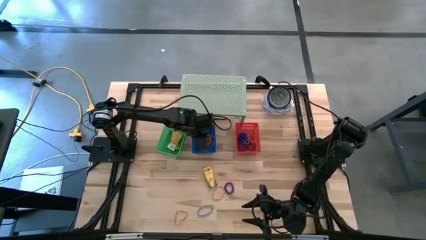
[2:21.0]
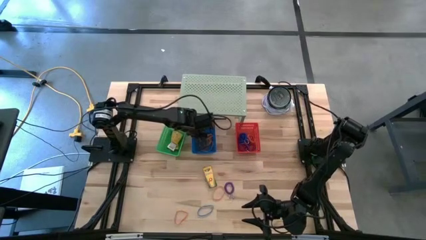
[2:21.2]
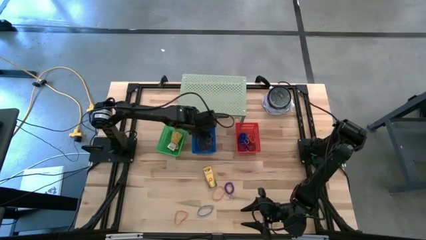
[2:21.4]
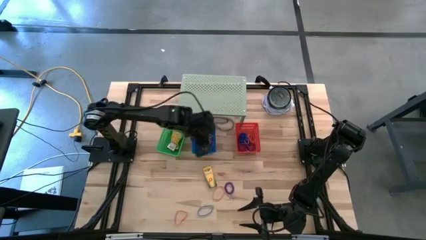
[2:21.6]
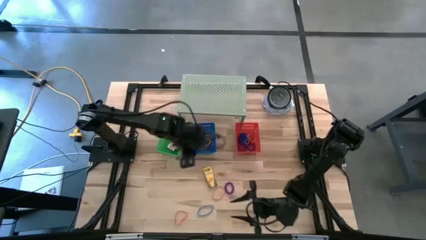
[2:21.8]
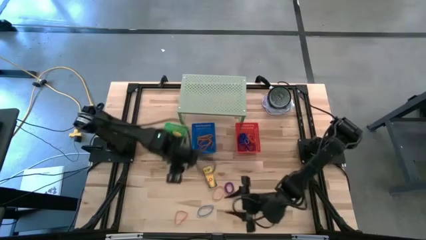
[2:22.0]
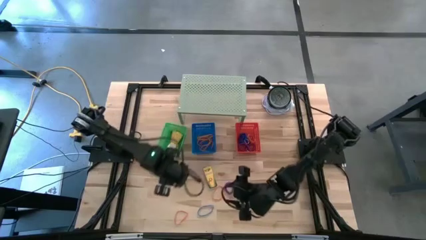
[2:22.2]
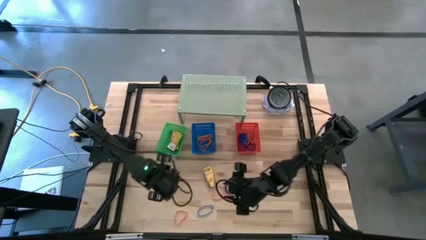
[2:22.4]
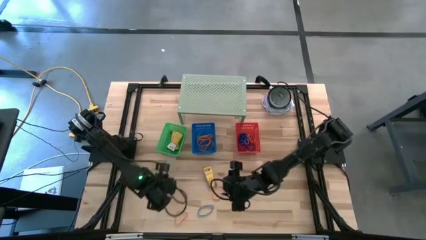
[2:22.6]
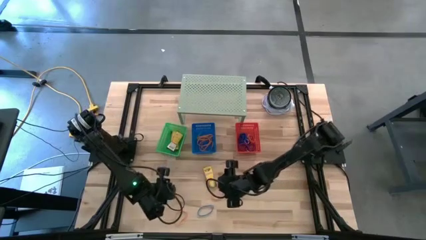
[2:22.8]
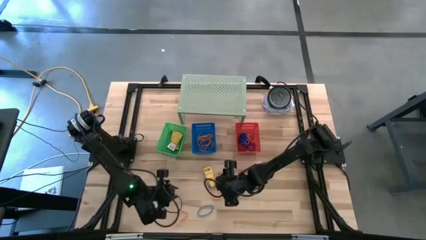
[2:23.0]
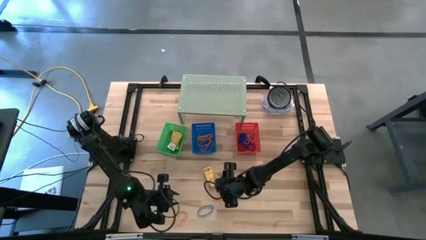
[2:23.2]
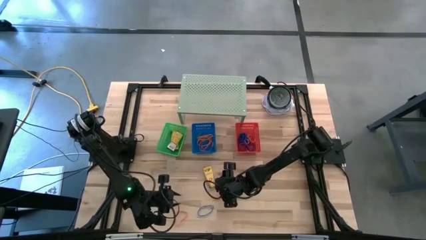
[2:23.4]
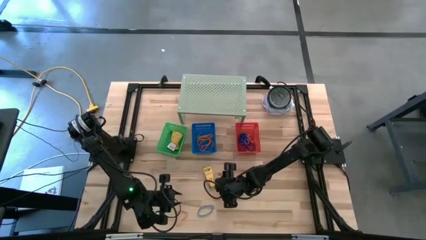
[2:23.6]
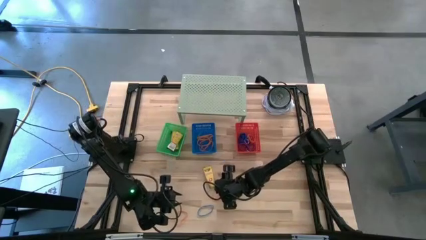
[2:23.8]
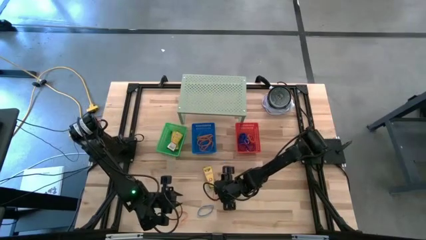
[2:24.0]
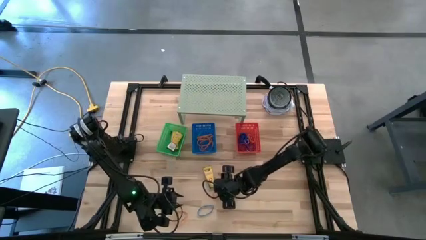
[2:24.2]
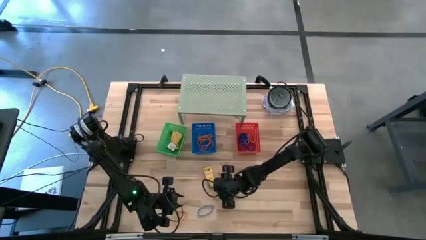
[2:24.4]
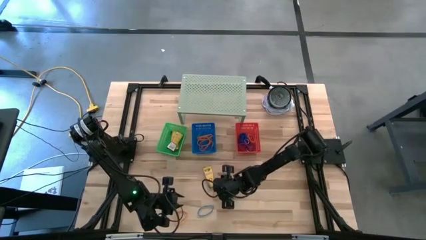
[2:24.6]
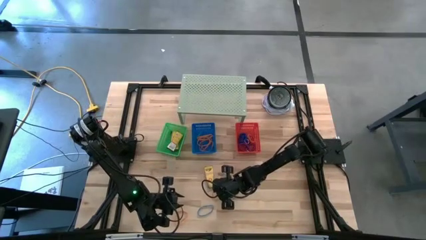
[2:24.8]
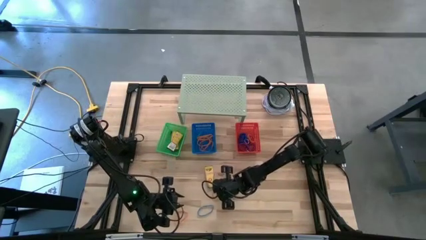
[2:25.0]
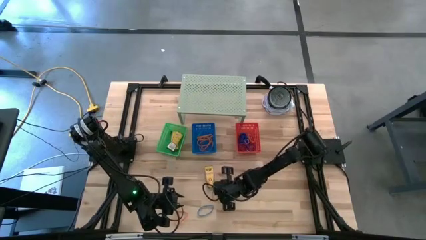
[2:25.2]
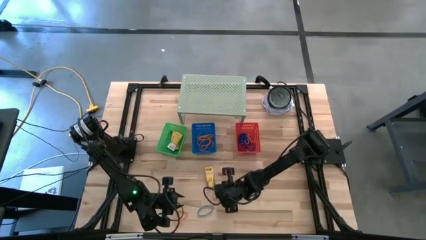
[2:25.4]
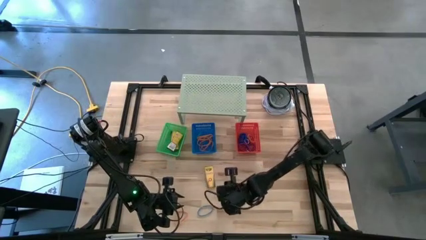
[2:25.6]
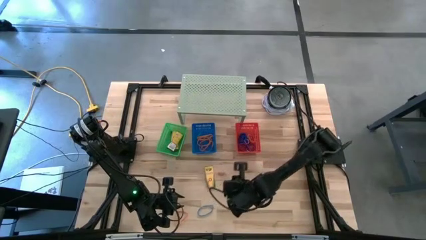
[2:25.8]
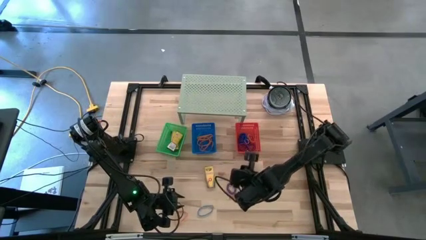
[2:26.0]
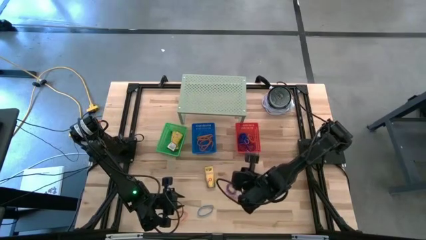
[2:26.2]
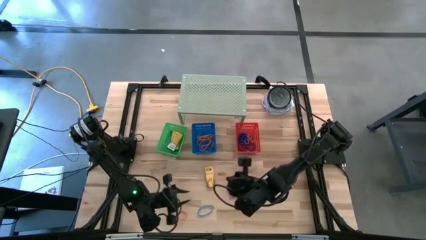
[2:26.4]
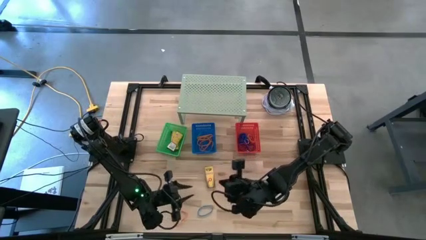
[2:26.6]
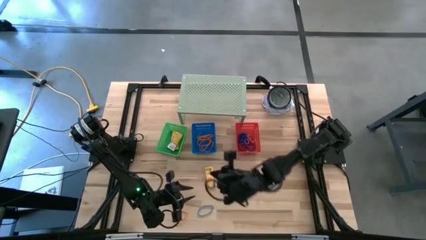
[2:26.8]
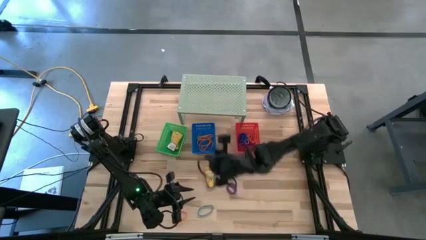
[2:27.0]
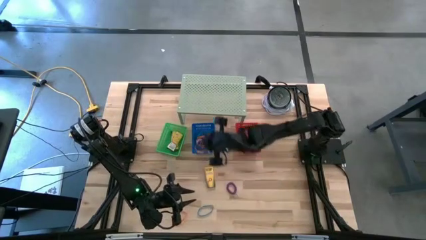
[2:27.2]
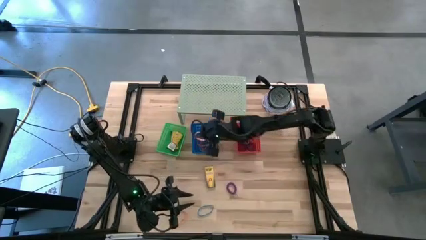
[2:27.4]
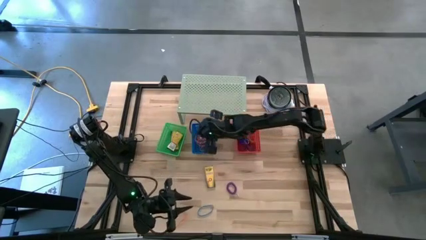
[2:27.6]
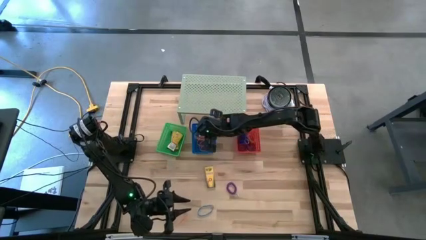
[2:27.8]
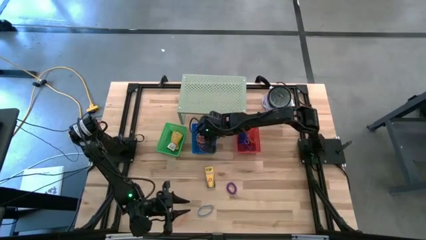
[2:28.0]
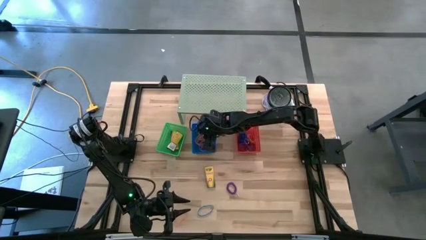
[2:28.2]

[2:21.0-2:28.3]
Task: Pick & Place Office Desk Supplies
Put the orange rubber band into the blue bin

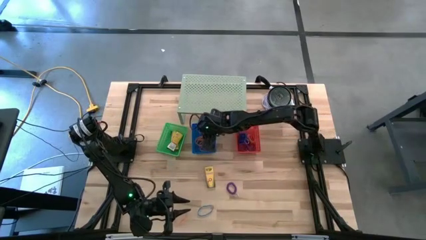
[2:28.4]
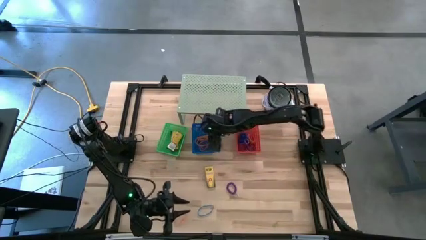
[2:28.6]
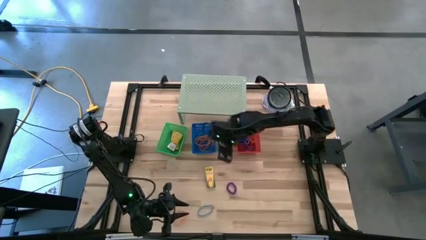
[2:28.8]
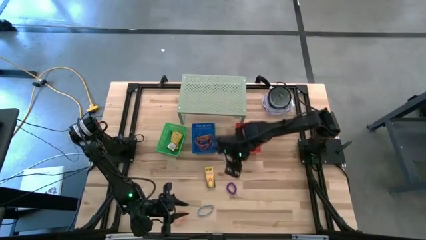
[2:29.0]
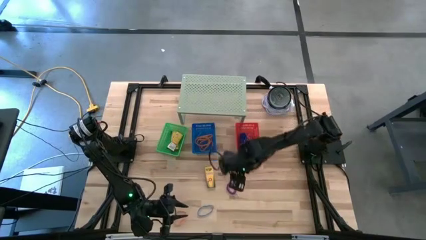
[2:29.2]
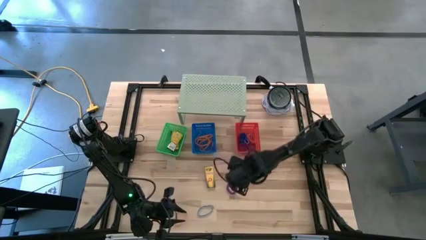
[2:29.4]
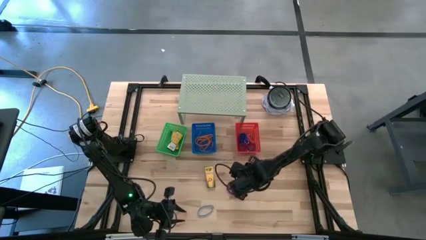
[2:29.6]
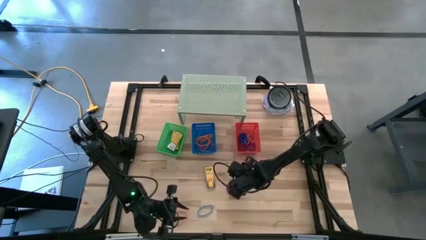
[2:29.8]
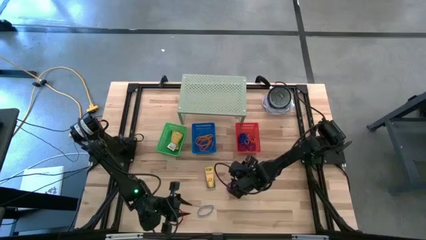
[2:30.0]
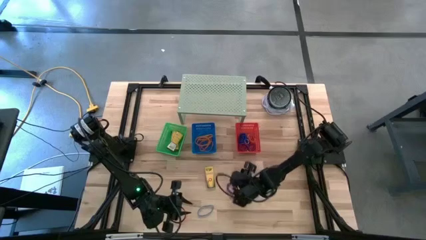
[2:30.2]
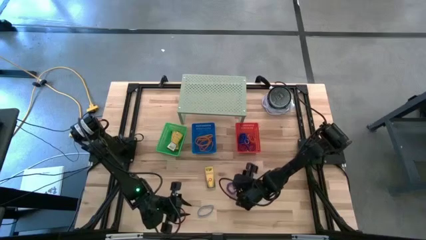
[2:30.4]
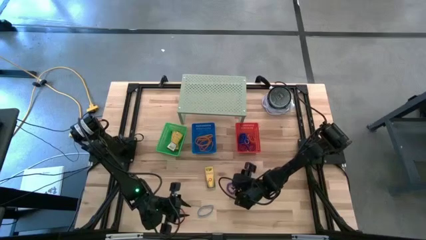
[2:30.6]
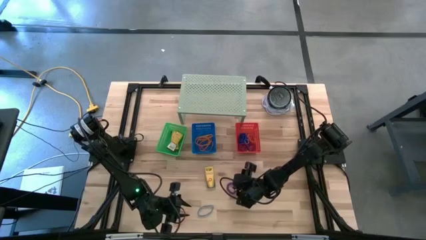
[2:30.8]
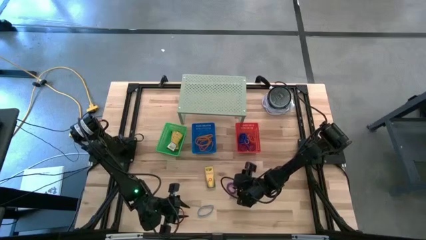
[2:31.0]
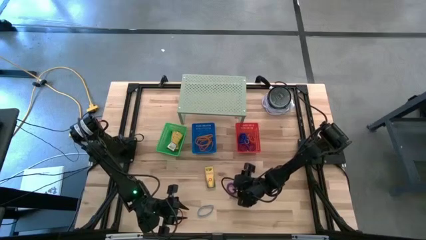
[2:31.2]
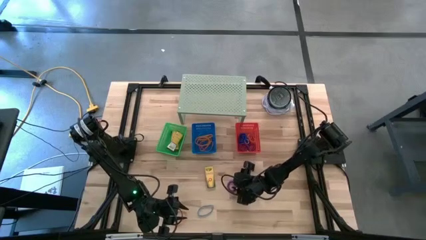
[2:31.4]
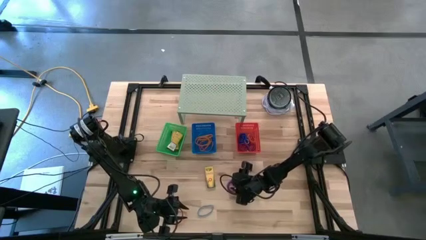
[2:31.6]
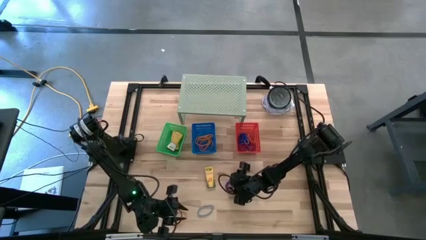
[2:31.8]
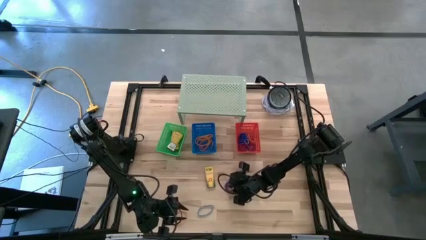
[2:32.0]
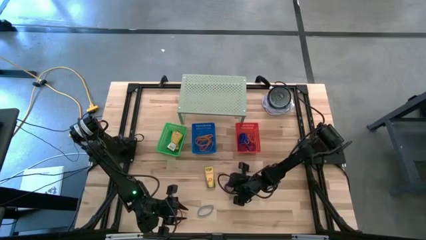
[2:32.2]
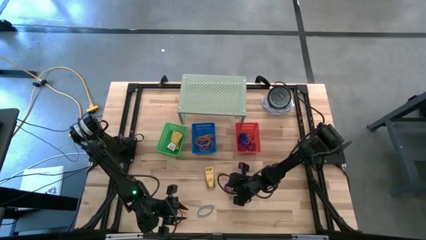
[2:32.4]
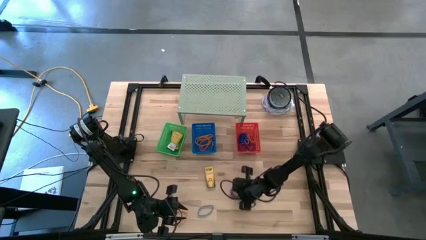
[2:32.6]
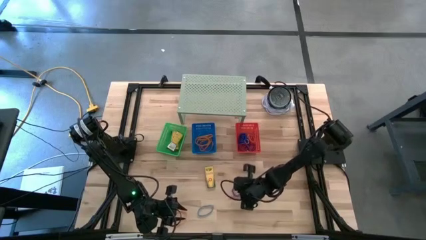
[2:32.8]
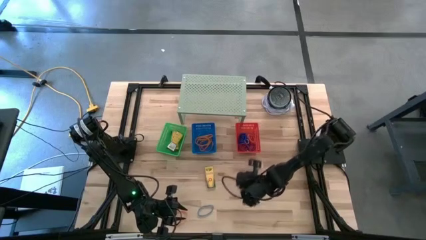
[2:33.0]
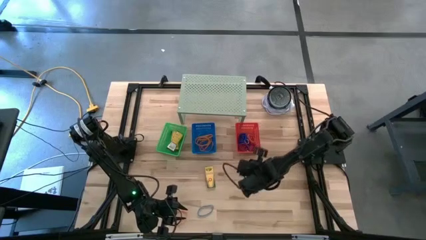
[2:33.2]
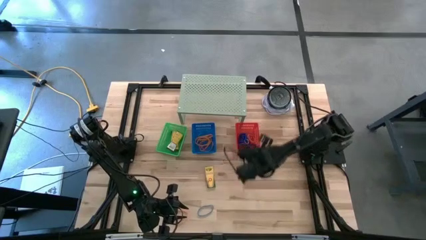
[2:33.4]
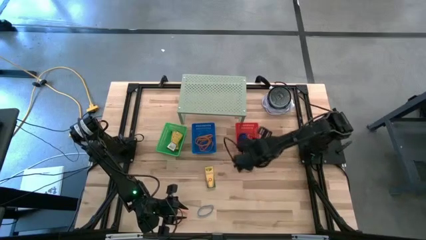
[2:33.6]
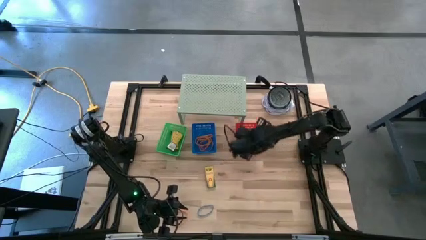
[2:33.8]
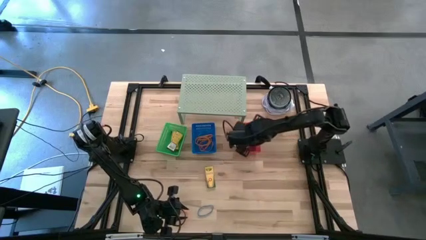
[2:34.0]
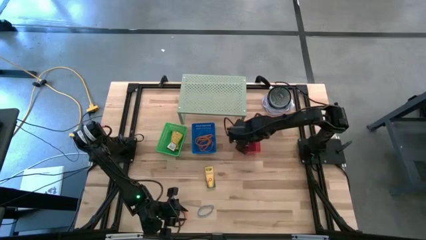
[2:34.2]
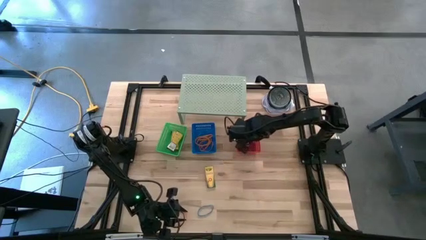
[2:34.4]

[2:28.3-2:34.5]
Put the purple spring keychain into the red bin

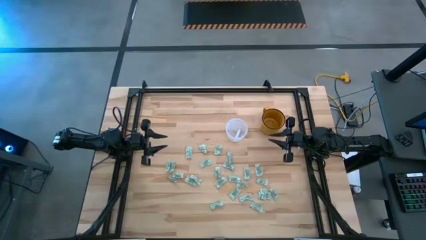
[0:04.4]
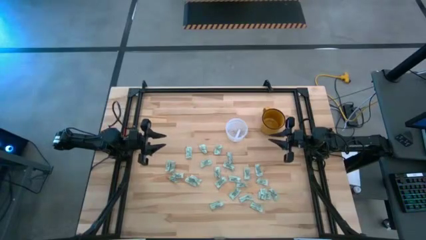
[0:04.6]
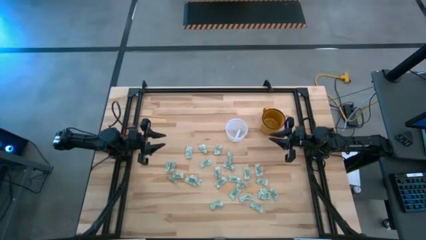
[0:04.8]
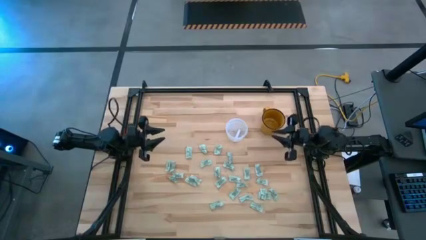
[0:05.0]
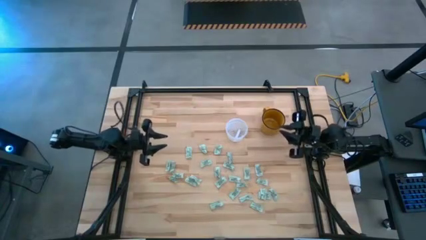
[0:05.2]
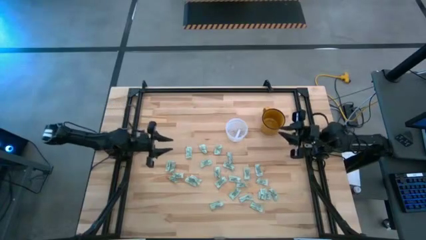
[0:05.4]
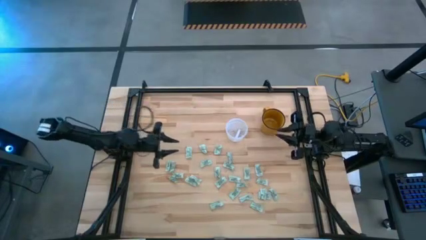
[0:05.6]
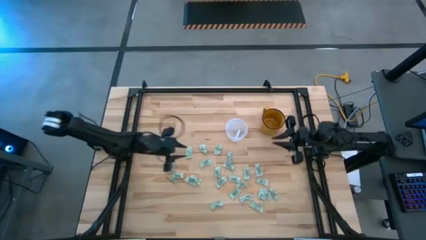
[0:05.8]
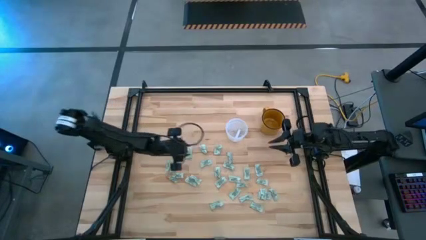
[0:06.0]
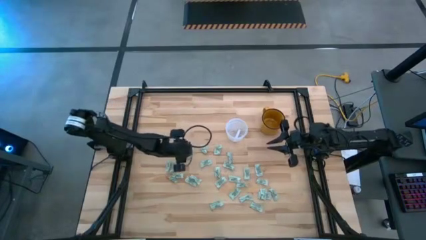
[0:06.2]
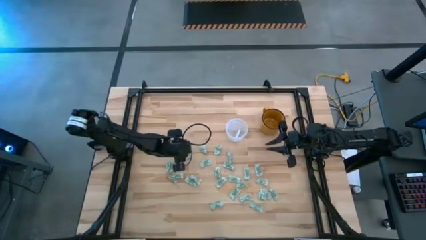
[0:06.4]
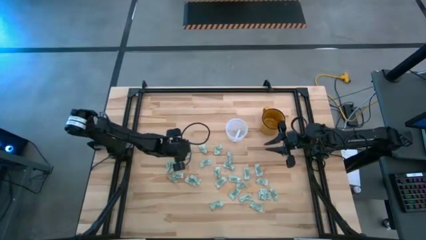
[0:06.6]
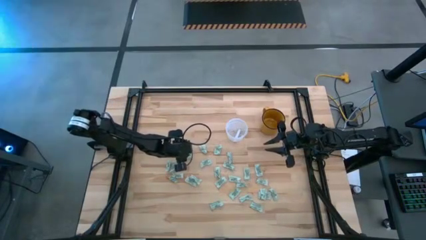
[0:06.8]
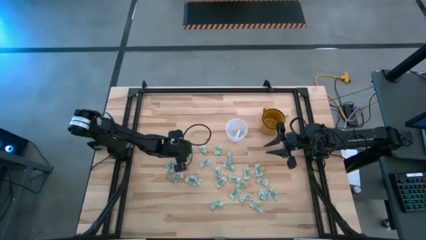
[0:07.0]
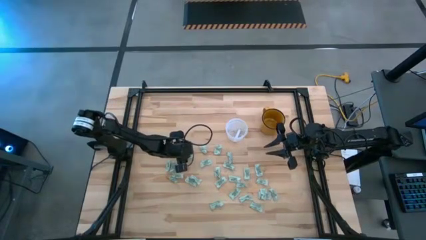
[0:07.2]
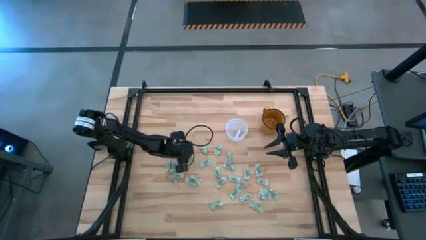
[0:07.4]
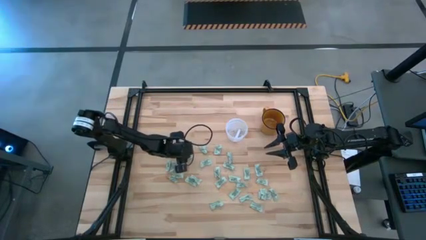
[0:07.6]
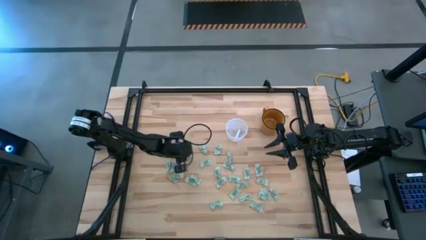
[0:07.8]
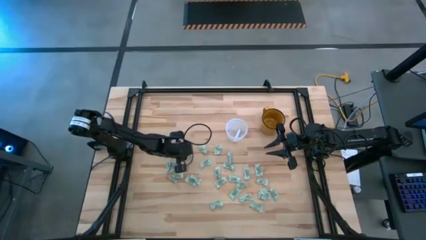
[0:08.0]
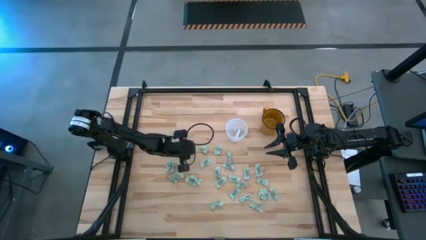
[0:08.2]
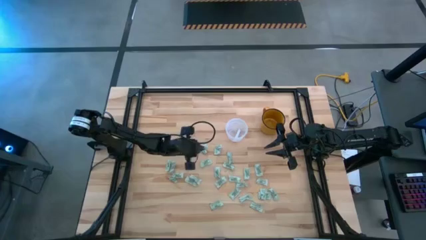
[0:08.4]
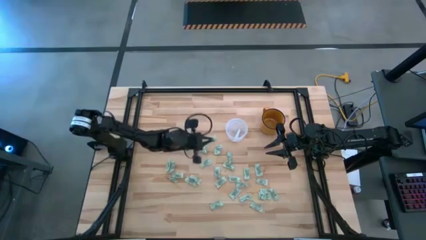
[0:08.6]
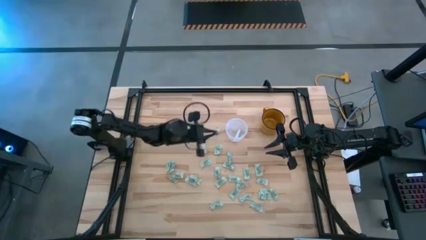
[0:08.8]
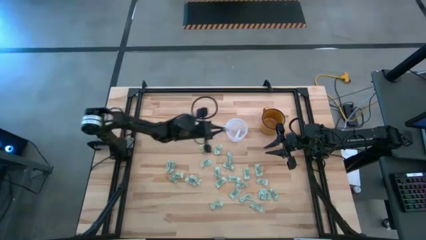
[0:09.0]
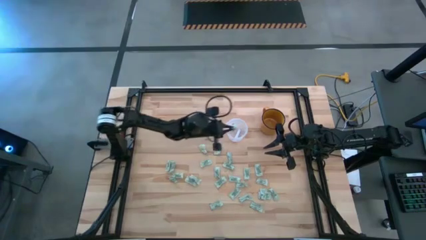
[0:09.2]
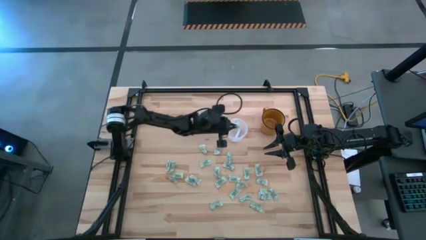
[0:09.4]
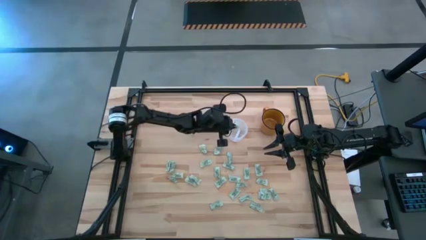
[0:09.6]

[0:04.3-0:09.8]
Task: Pick and place Stevia / Truvia into bins
Put the green stevia packet into the transparent bin
